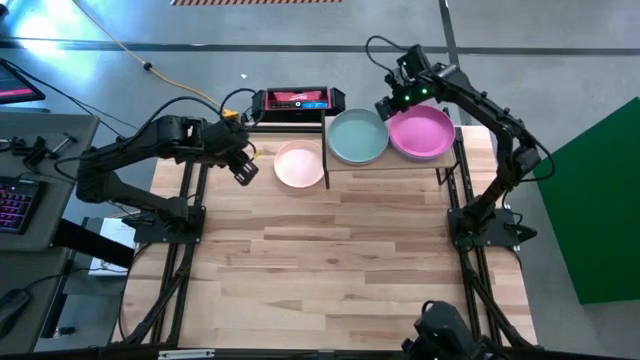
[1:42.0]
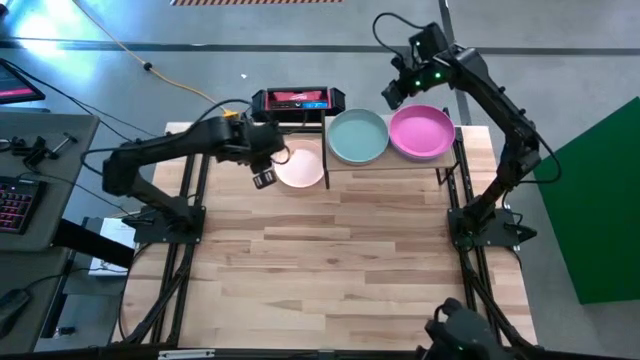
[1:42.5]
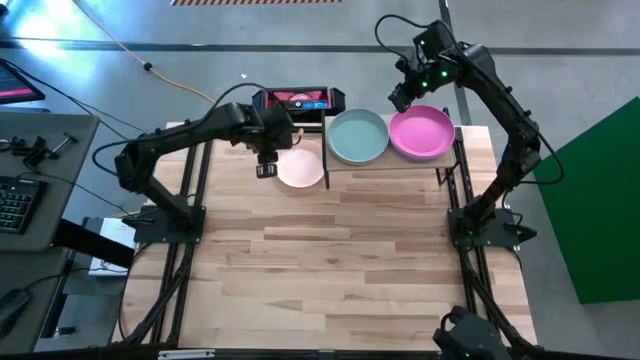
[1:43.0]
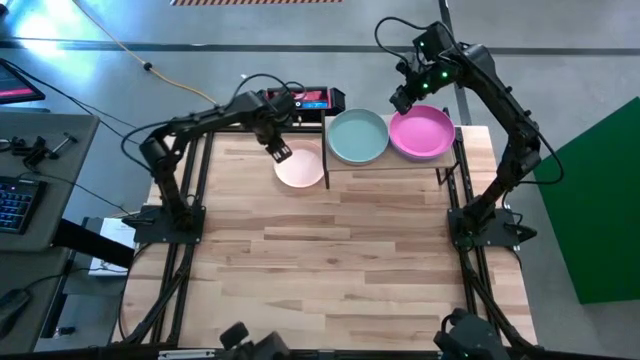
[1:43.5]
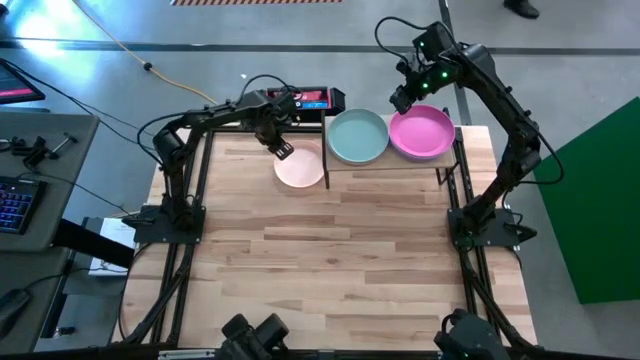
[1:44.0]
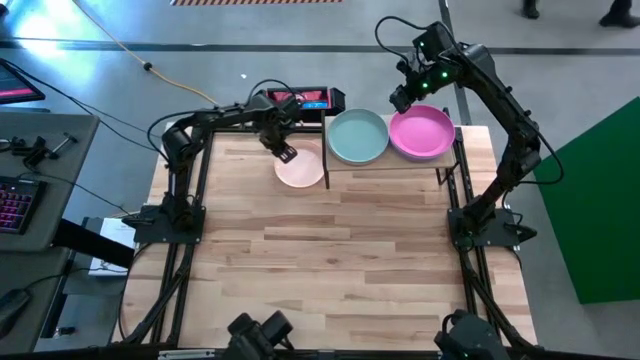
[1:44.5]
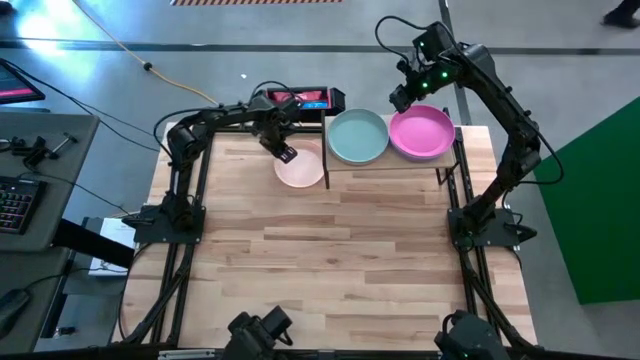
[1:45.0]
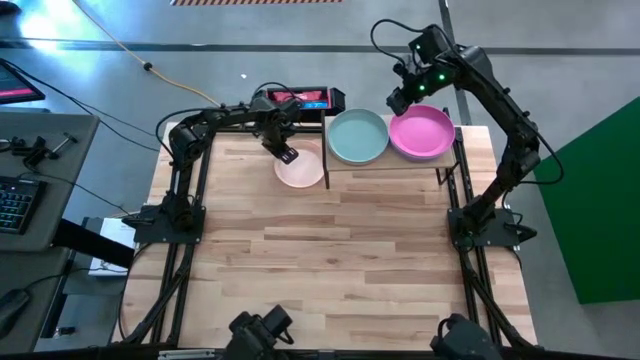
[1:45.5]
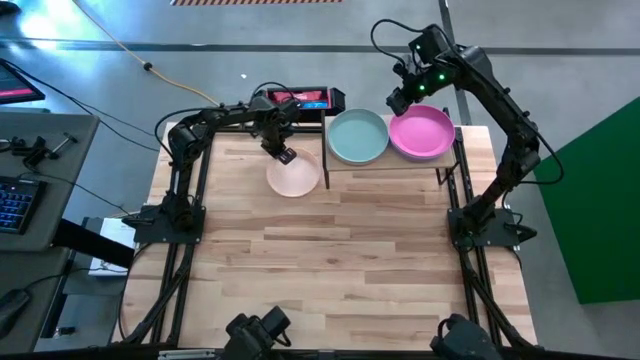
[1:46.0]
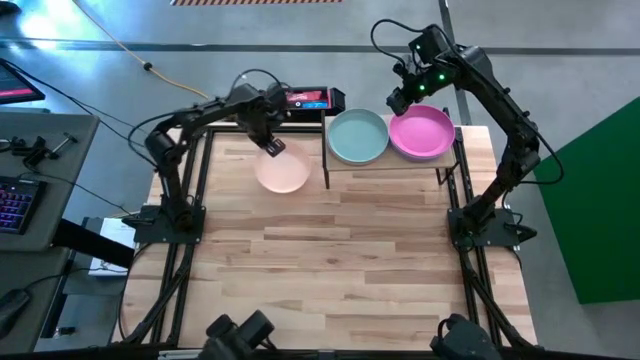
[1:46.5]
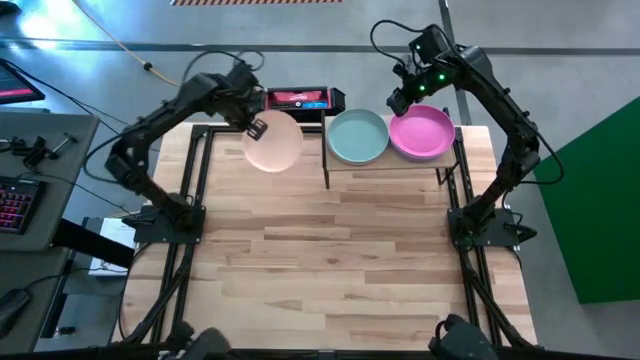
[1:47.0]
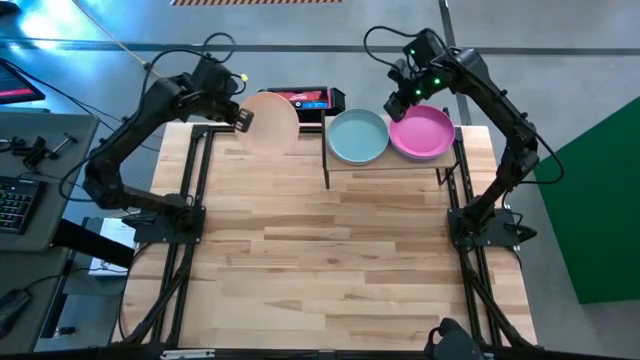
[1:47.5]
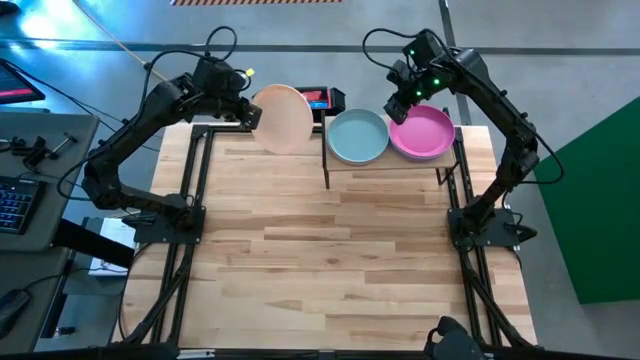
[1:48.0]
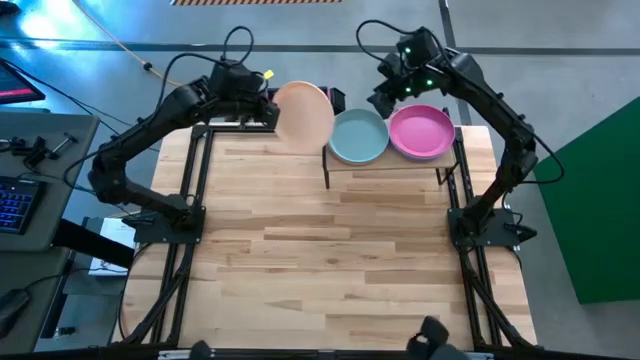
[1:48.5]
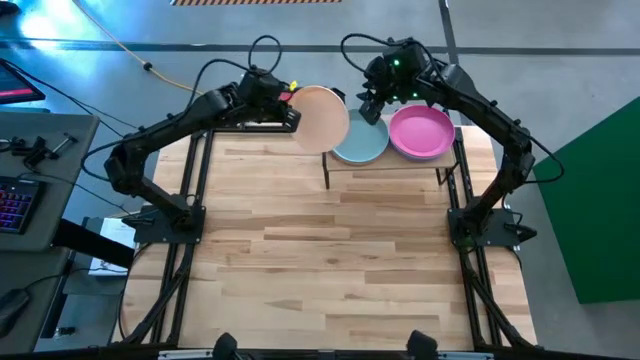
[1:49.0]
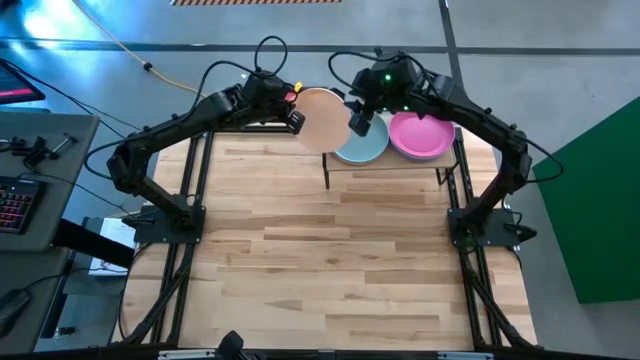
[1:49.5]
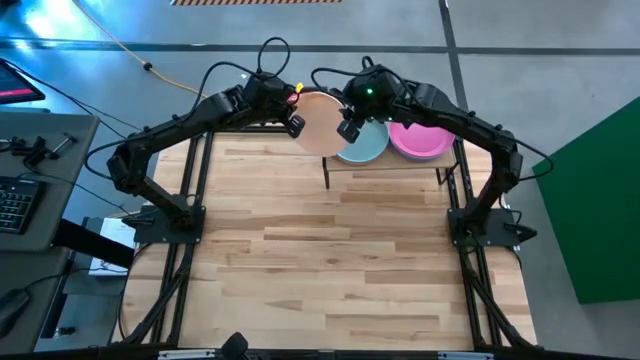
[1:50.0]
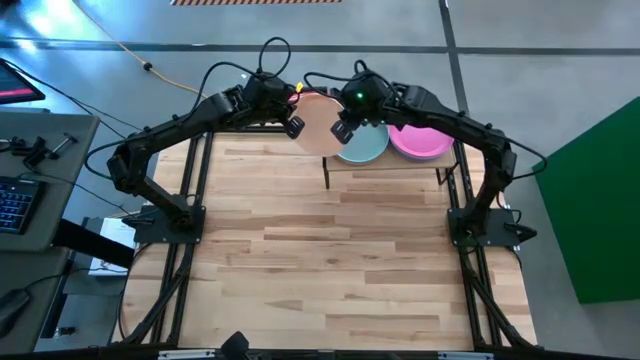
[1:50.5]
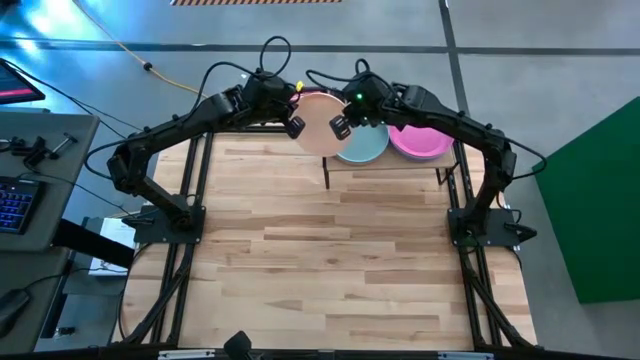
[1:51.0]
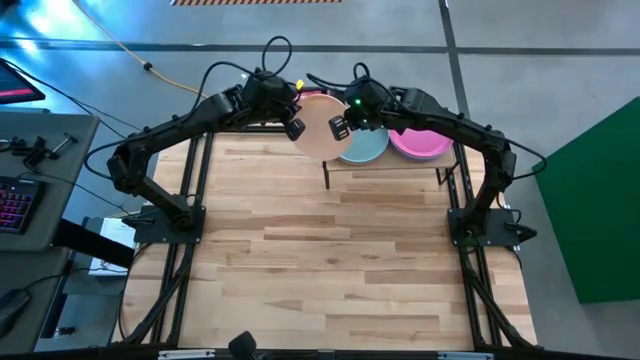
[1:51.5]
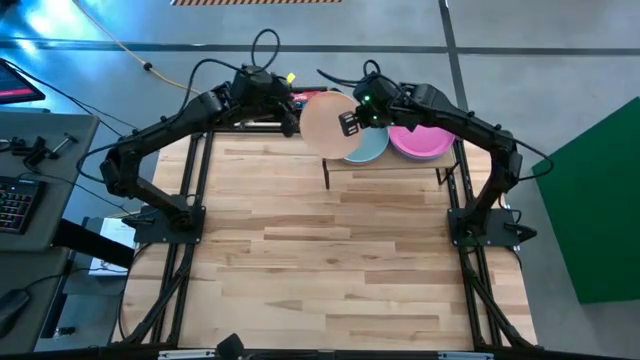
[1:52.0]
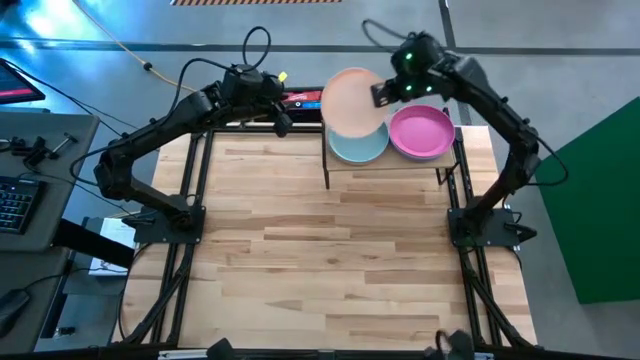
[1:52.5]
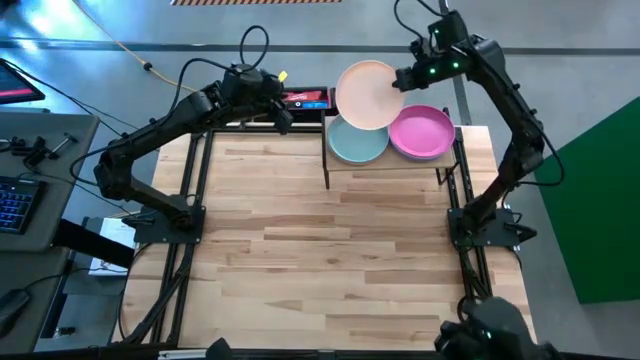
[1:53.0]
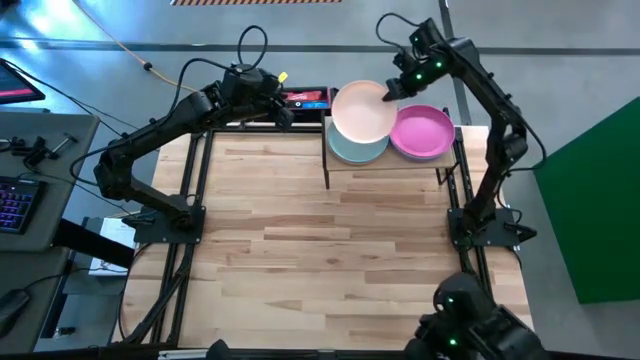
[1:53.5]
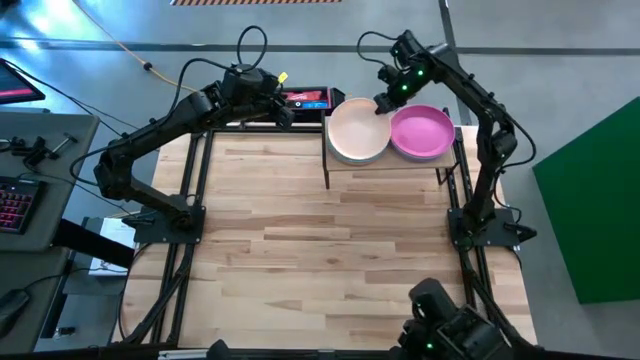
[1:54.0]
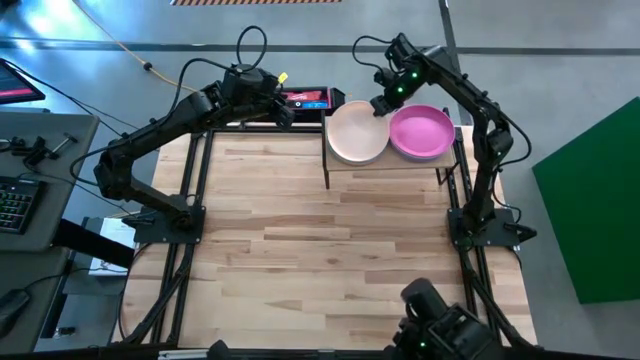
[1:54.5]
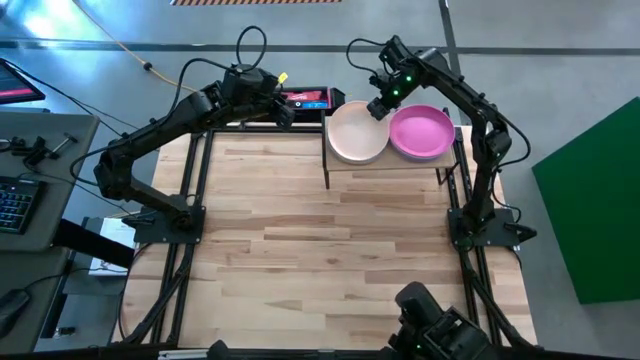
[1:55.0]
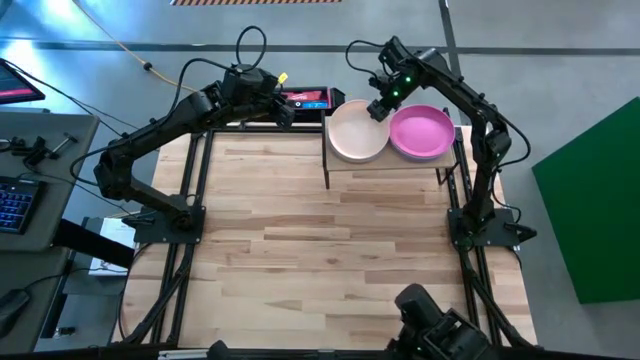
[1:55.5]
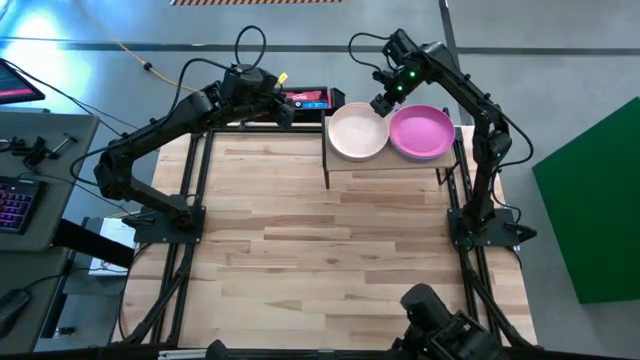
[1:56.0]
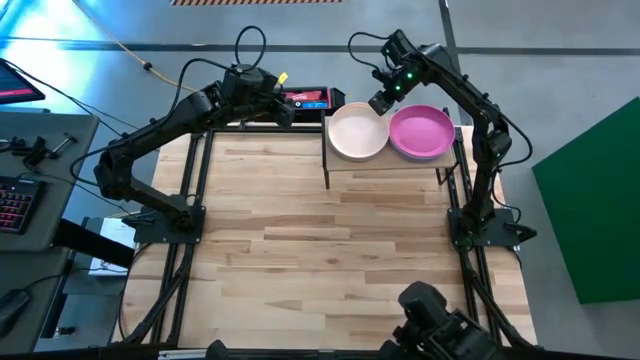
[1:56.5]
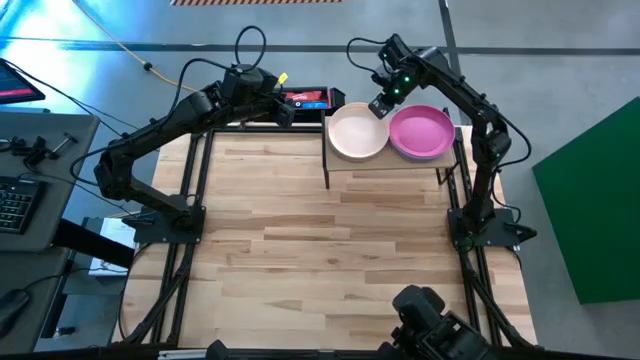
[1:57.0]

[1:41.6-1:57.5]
Task: Place and stack plates onto a shelf
Stack the light yellow plate on the light blue plate on the shelf

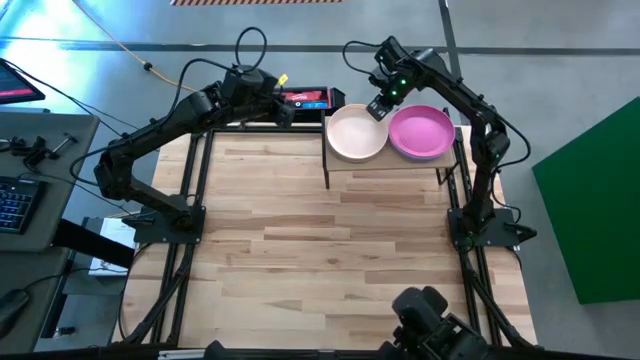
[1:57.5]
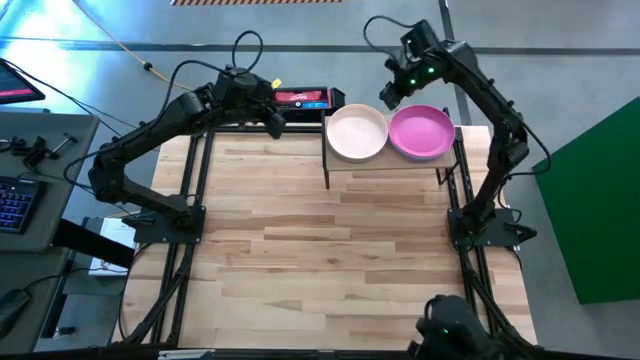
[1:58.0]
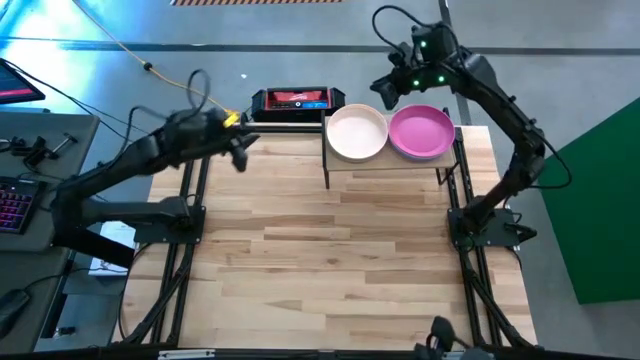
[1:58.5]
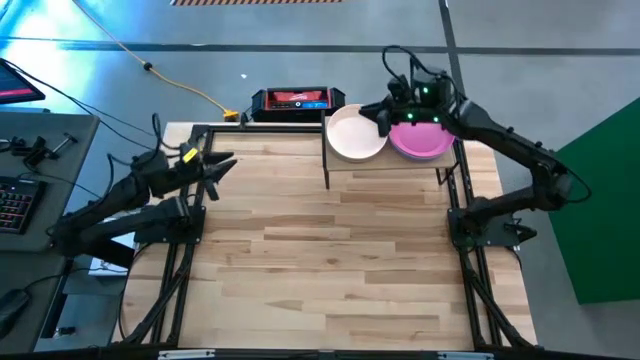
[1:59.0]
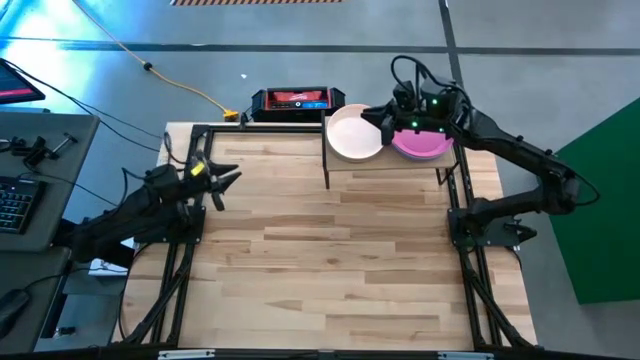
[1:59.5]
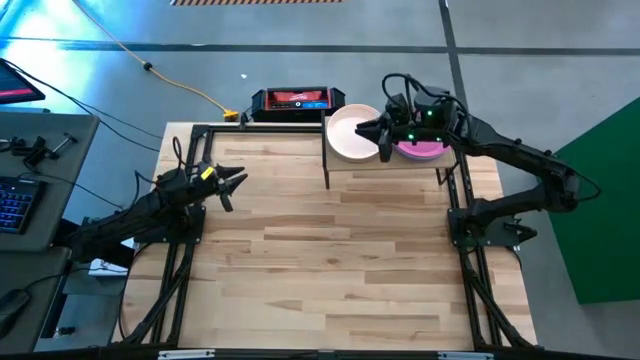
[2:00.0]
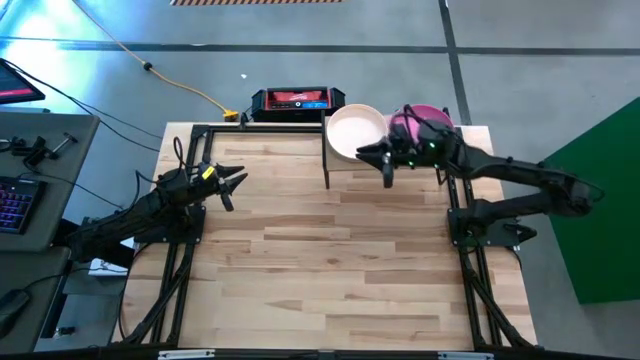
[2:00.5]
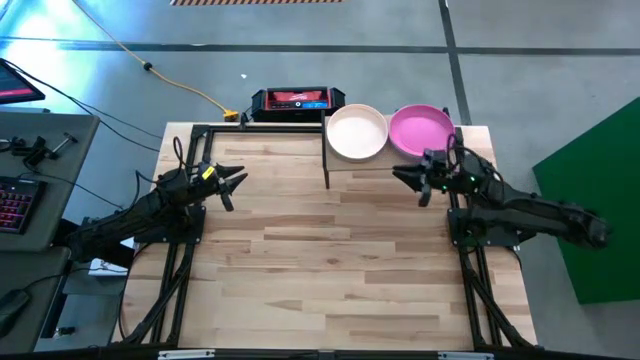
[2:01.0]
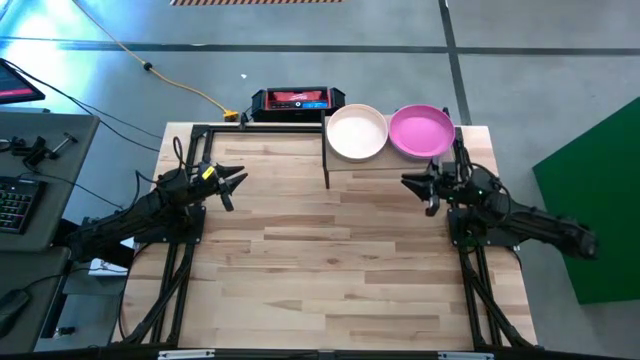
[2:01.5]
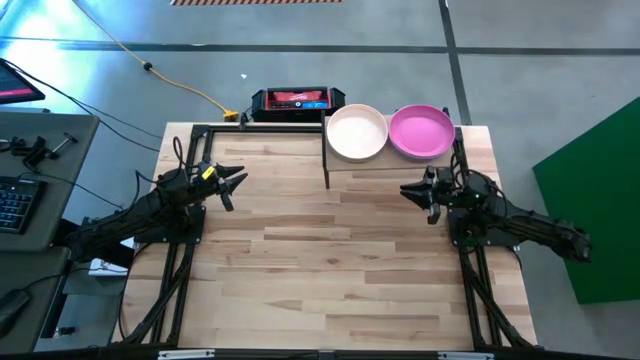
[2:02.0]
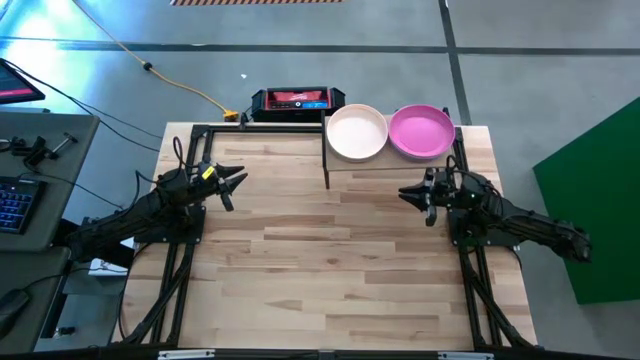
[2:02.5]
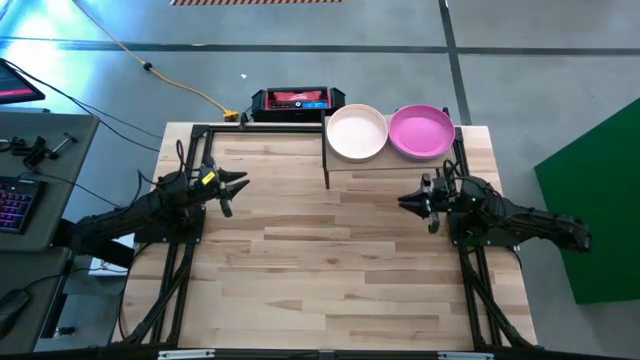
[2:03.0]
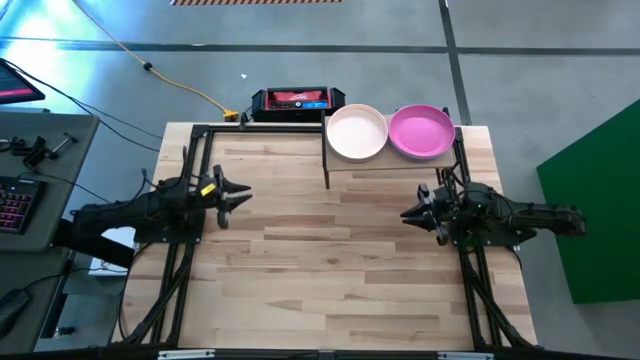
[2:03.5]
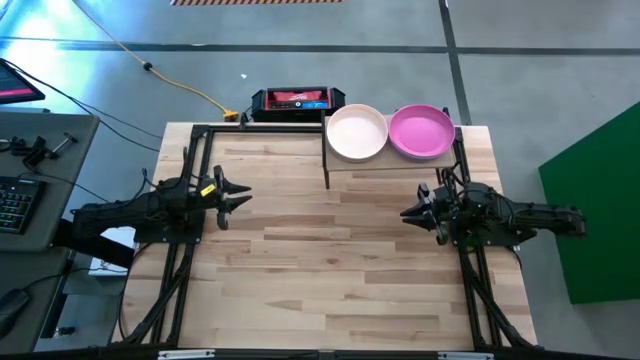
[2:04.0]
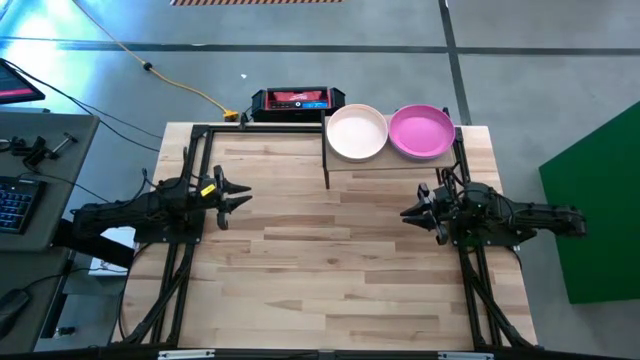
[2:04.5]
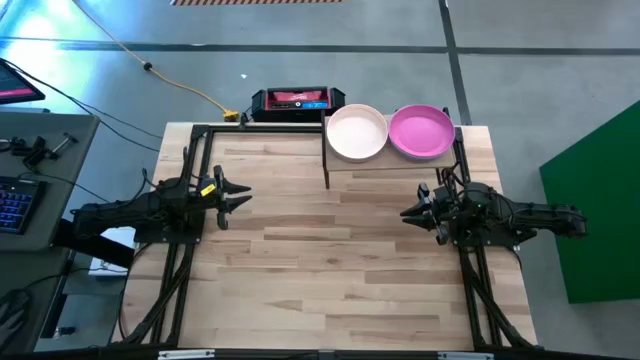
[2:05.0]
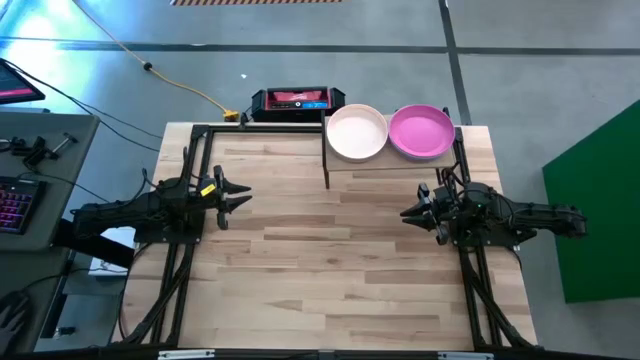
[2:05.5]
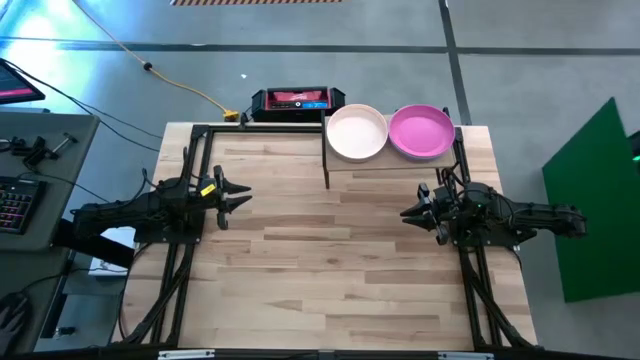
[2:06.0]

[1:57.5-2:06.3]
Return to Home Position
